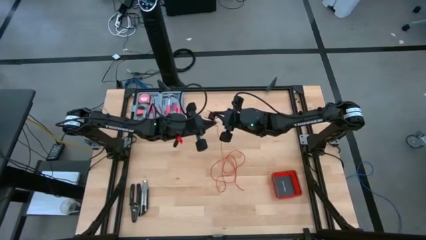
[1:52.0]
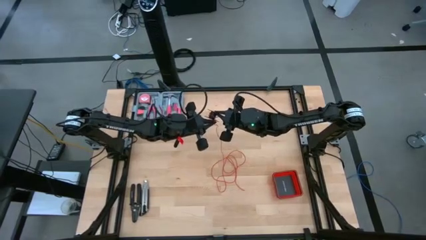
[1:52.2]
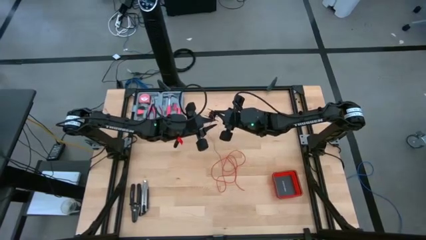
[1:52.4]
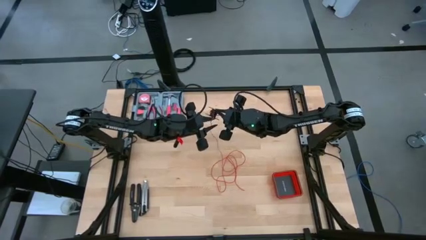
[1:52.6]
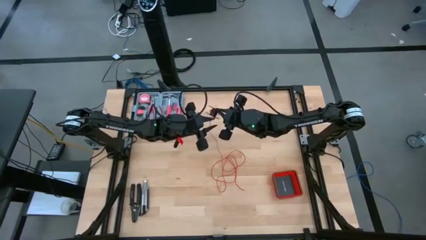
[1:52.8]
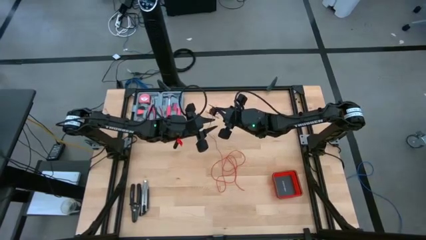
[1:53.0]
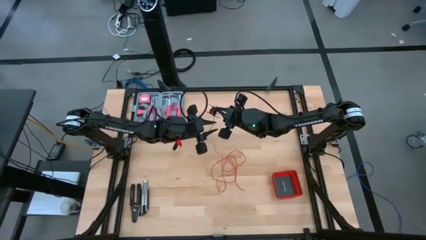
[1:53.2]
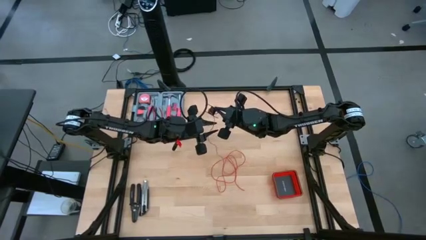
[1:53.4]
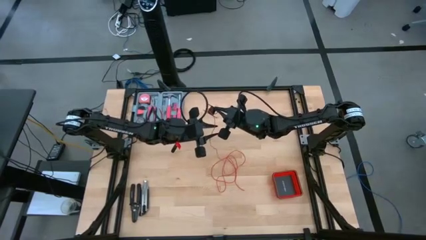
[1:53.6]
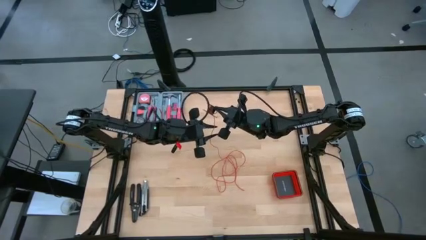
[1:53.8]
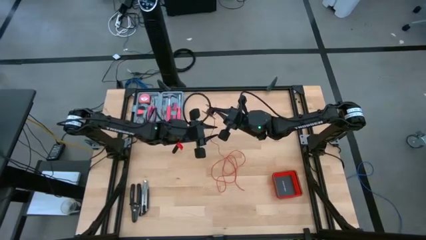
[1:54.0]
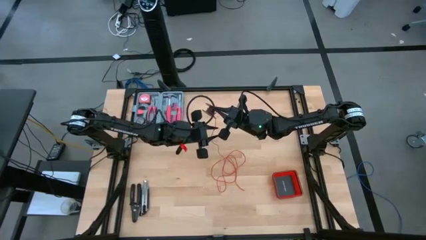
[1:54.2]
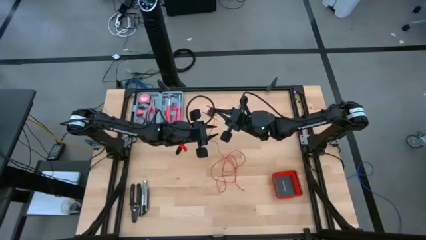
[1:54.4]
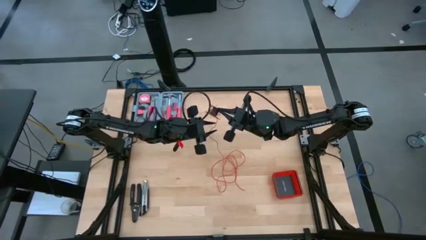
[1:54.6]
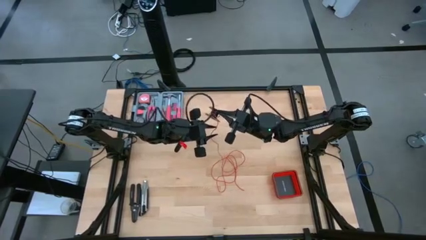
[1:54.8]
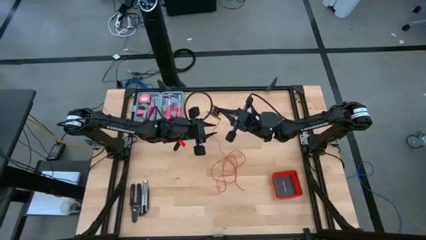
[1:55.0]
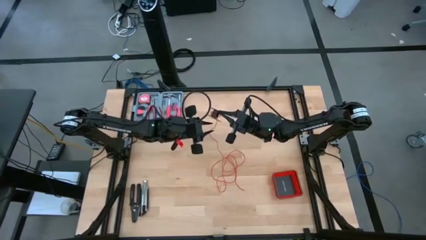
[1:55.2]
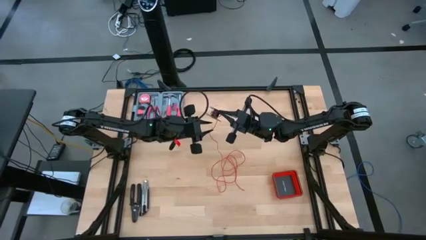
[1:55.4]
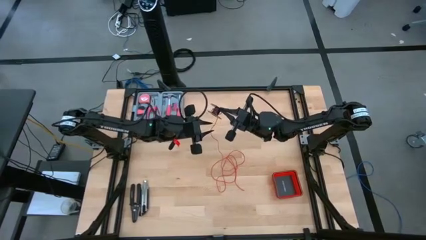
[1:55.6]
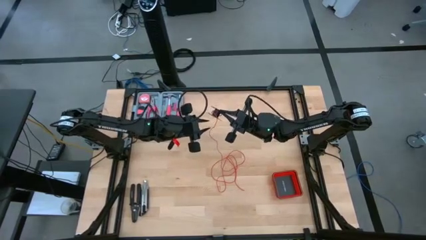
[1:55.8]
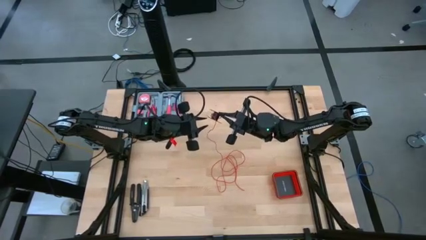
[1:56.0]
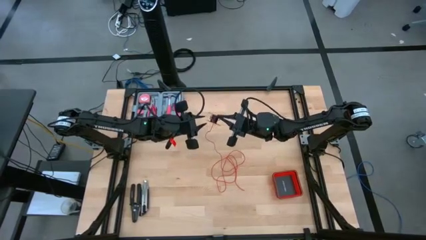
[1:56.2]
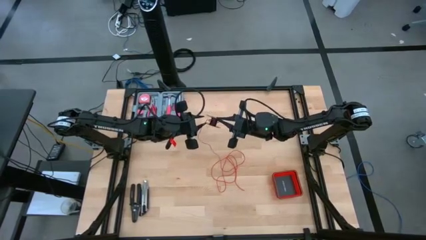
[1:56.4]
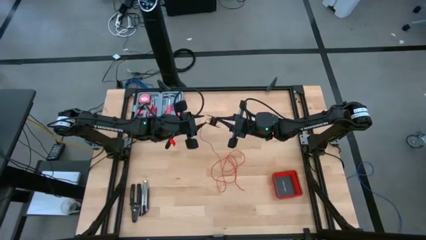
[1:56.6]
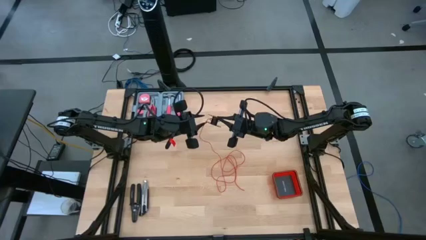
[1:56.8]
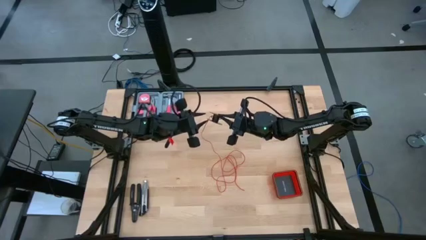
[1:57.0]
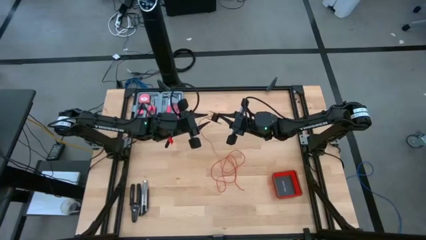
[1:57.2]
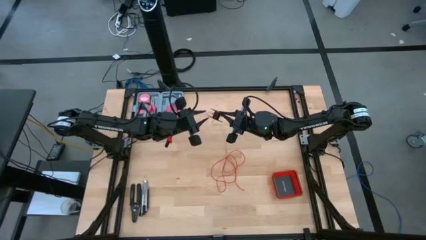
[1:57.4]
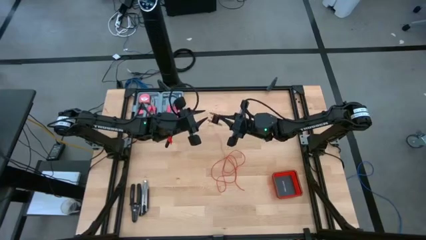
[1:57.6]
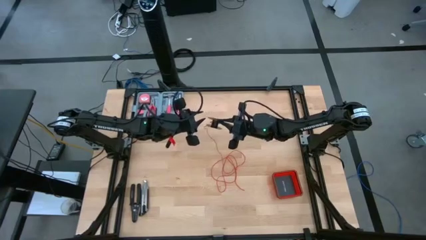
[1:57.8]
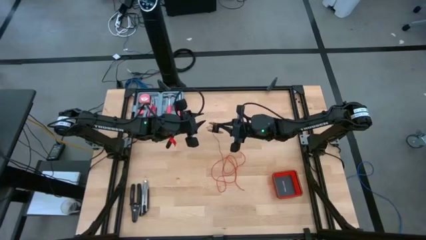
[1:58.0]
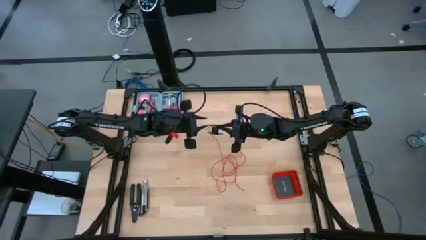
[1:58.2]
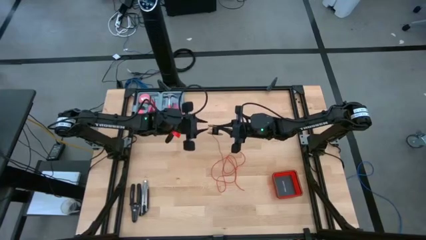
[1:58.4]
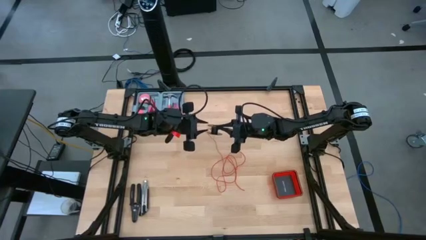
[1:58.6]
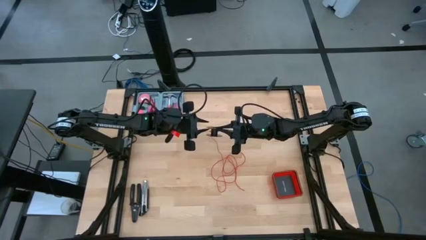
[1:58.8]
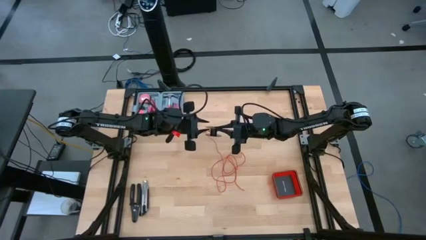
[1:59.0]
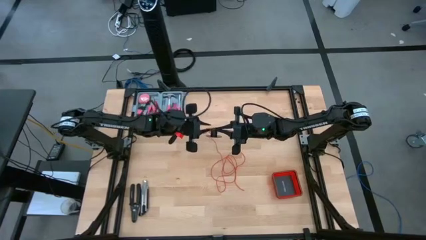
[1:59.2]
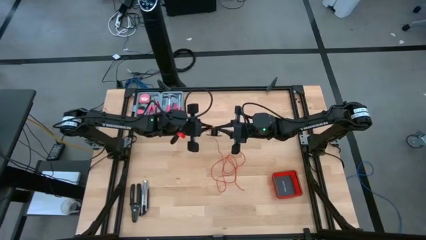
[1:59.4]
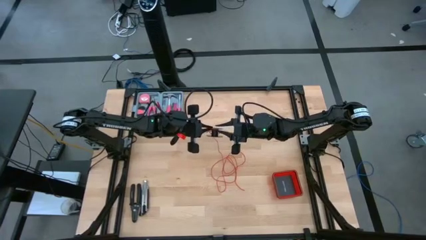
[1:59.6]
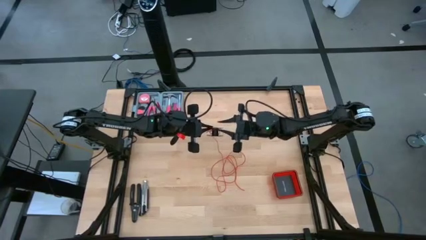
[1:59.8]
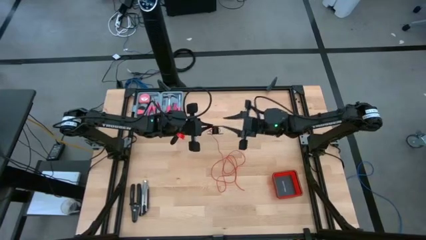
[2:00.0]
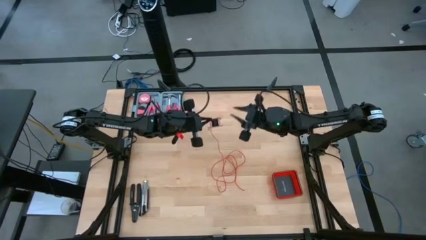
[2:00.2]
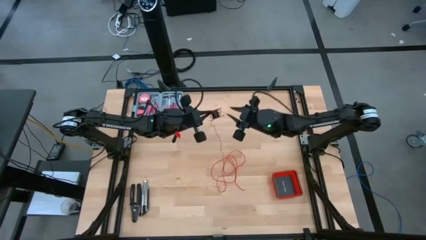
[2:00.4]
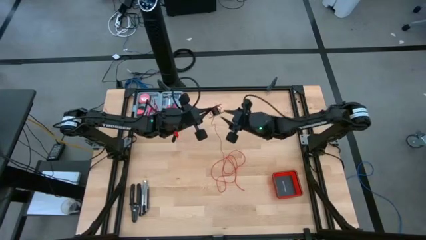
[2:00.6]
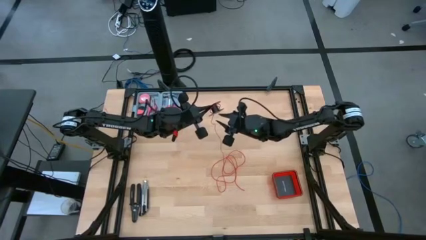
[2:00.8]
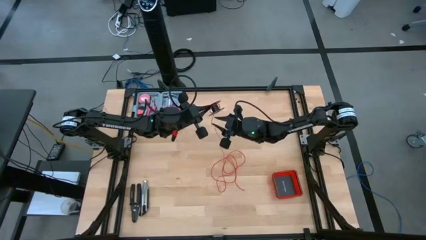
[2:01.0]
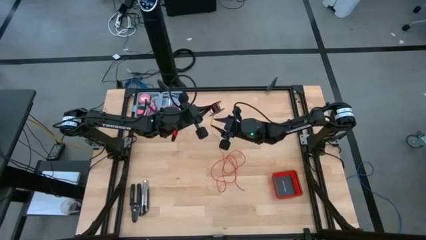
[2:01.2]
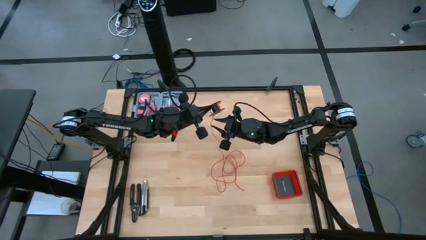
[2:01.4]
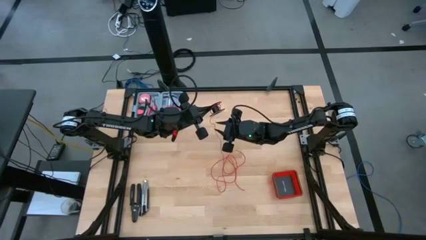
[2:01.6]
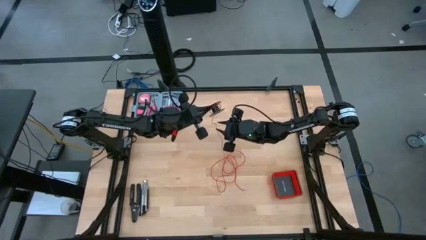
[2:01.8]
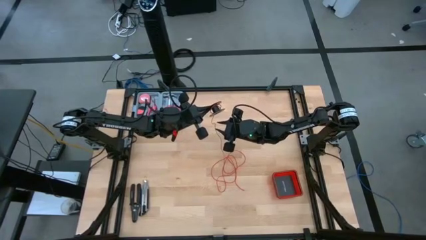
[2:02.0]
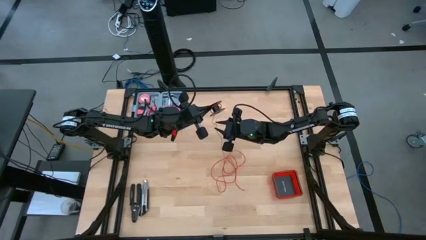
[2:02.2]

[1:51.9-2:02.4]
Task: Coil cords
Coil the red wire onto the spool

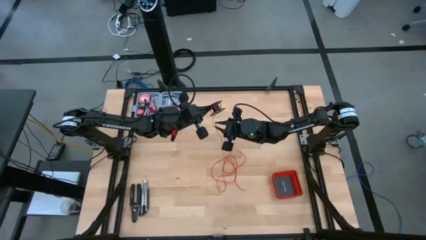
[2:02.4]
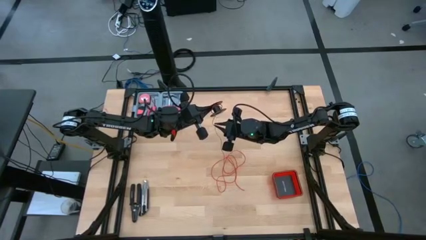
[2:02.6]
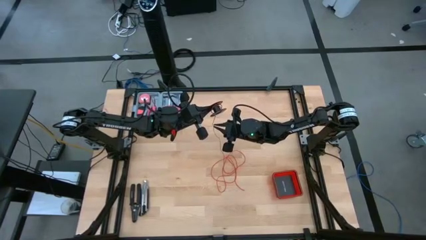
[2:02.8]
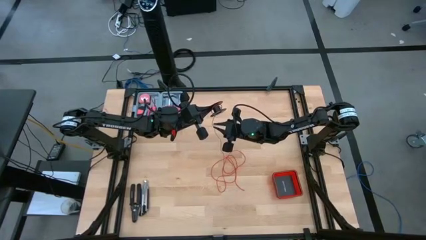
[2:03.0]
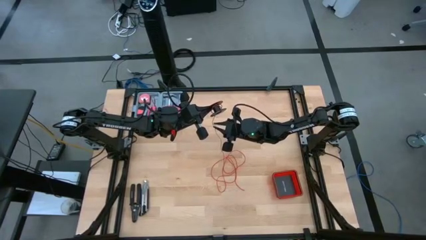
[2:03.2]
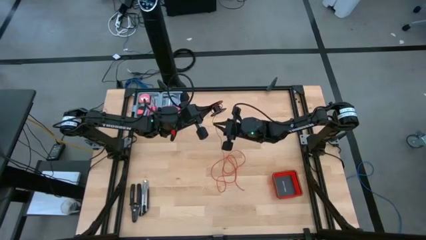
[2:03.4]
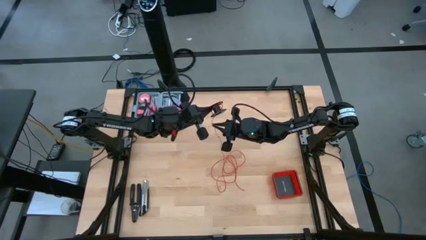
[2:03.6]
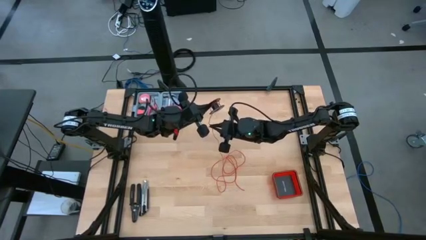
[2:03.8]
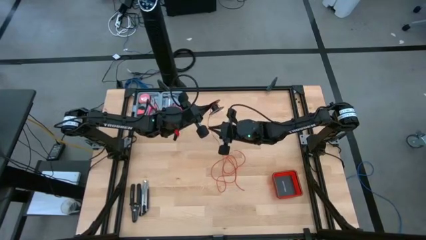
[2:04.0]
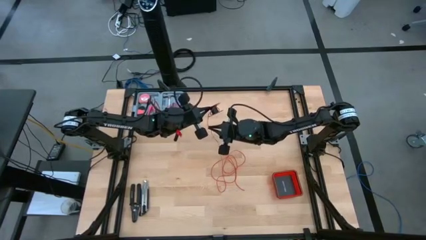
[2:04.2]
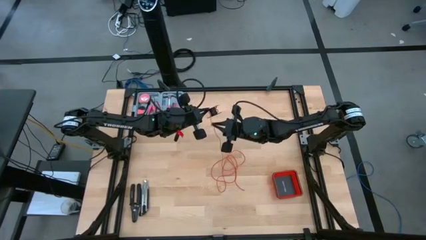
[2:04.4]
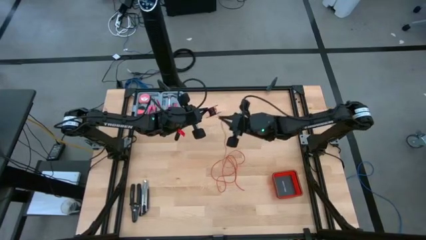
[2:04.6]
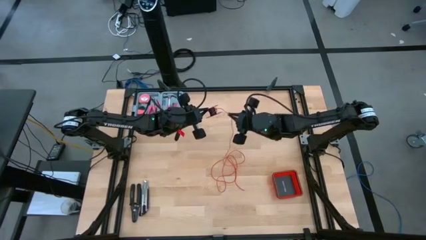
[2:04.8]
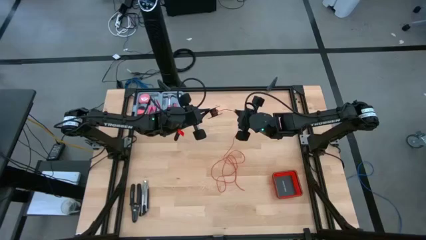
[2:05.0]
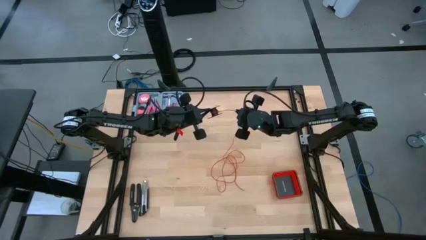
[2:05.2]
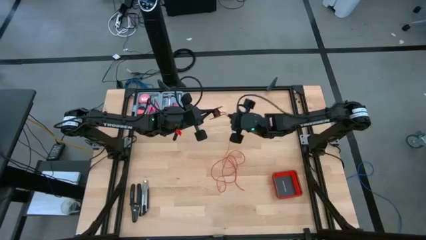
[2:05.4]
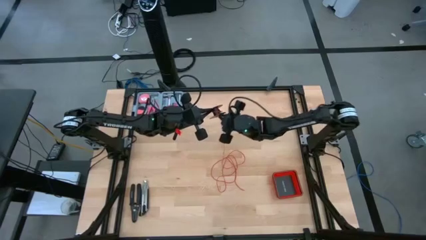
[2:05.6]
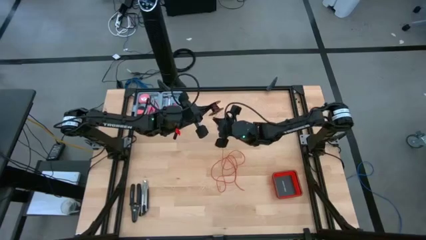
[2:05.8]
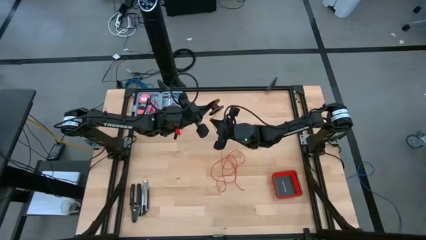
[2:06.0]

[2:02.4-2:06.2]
Coil the red wire onto the spool
